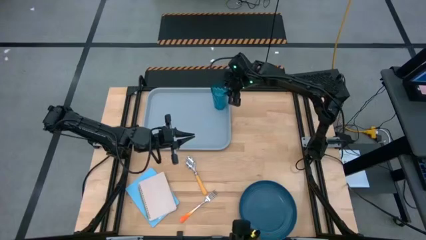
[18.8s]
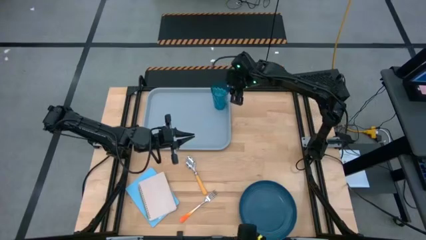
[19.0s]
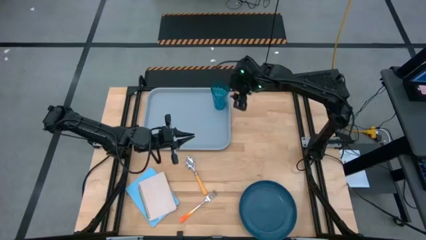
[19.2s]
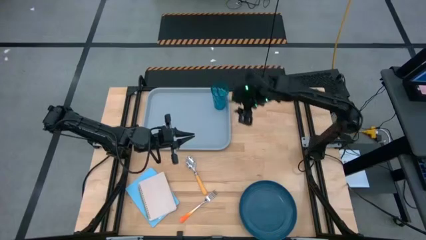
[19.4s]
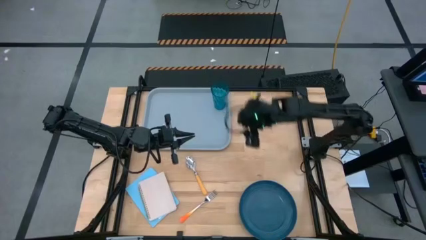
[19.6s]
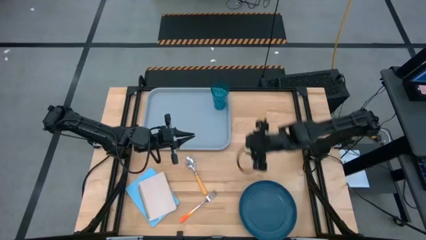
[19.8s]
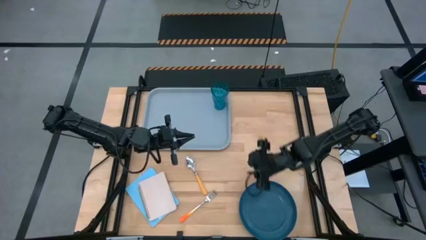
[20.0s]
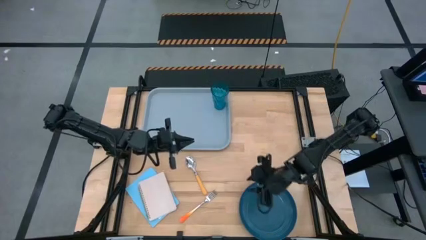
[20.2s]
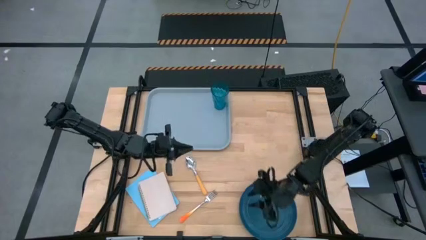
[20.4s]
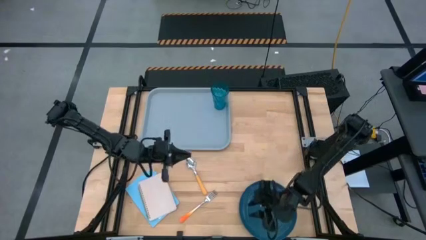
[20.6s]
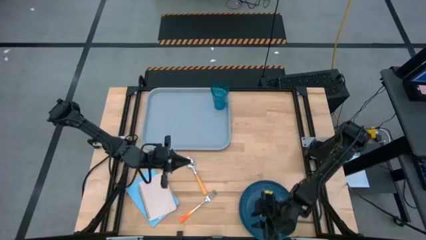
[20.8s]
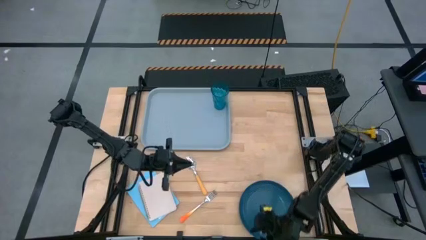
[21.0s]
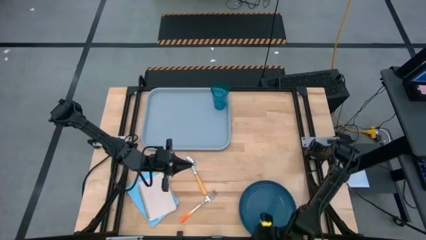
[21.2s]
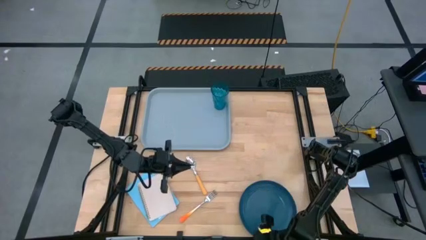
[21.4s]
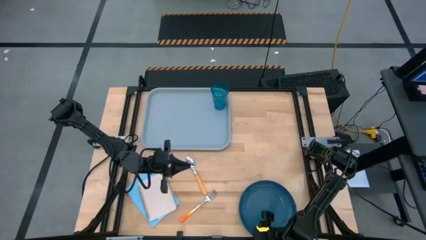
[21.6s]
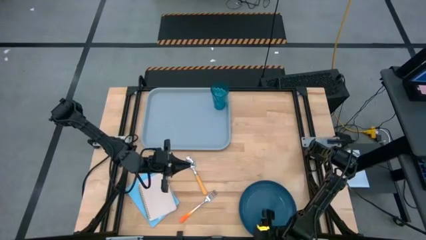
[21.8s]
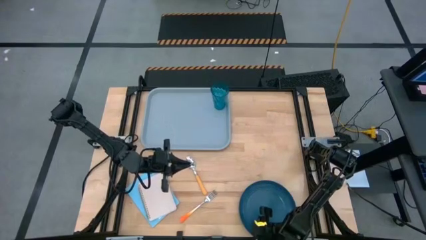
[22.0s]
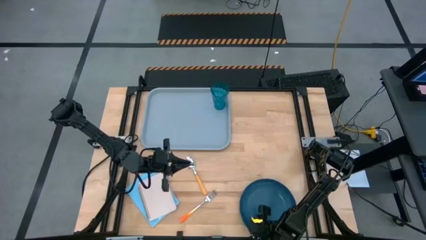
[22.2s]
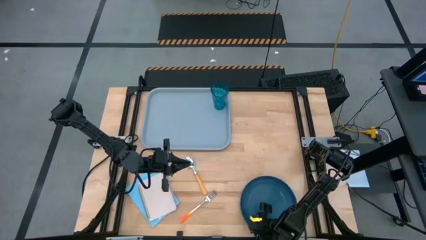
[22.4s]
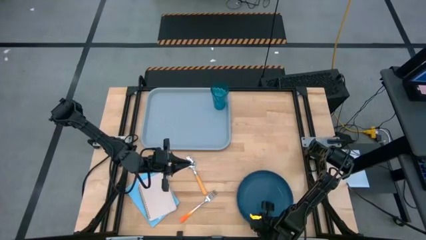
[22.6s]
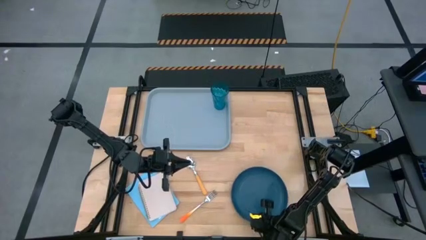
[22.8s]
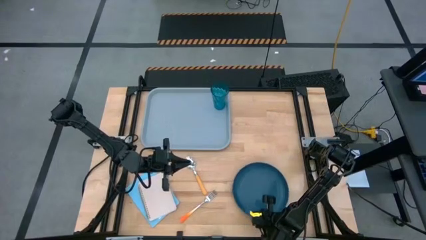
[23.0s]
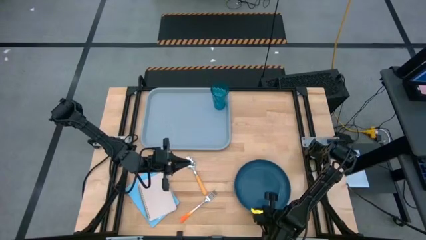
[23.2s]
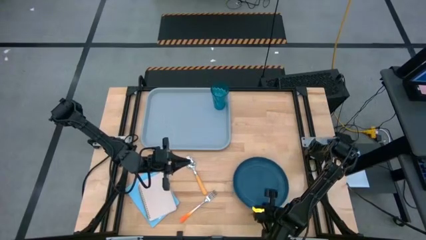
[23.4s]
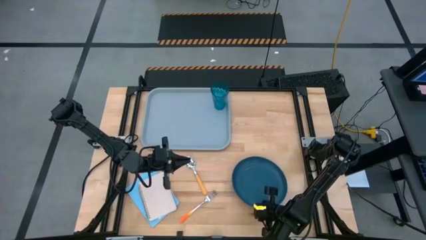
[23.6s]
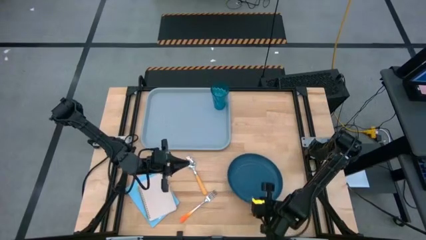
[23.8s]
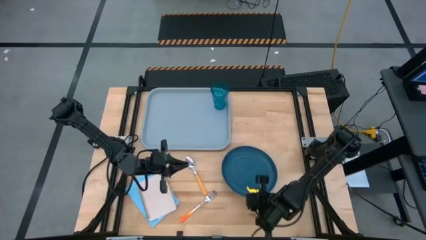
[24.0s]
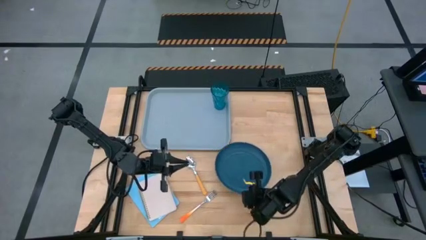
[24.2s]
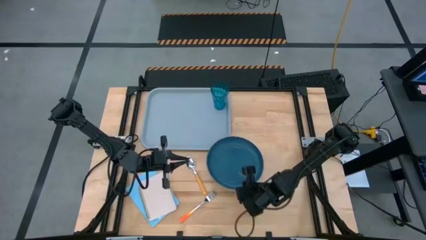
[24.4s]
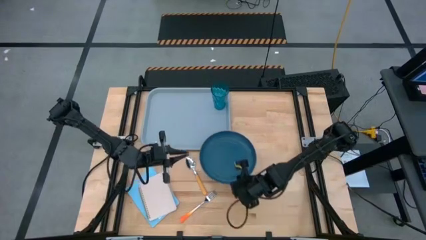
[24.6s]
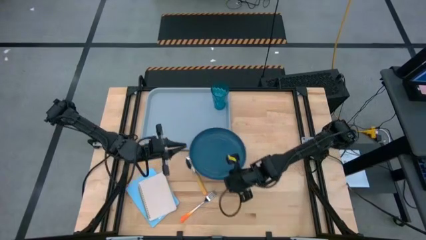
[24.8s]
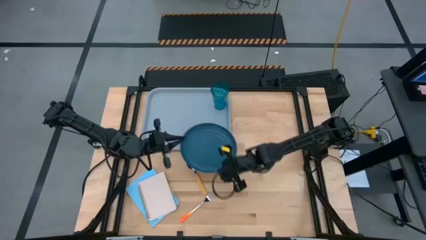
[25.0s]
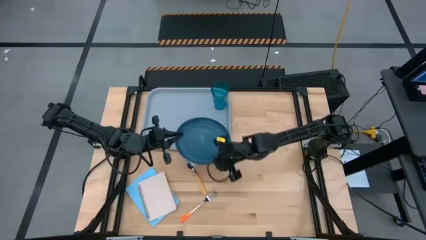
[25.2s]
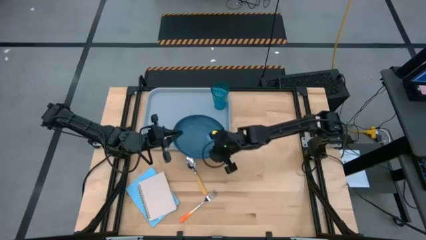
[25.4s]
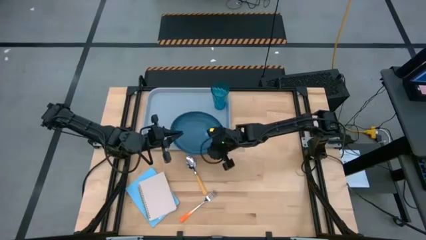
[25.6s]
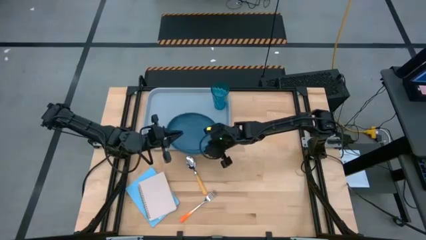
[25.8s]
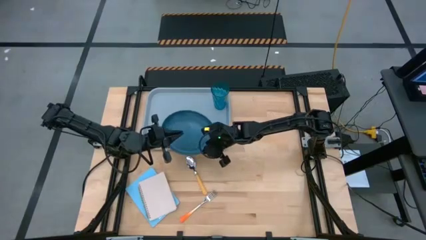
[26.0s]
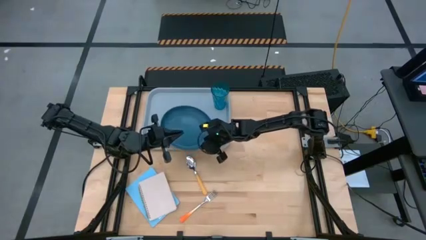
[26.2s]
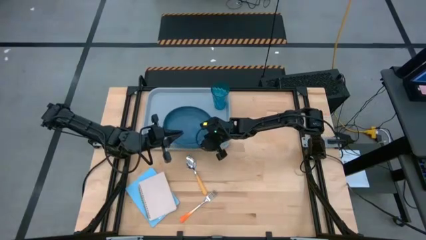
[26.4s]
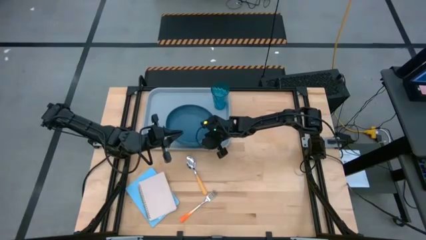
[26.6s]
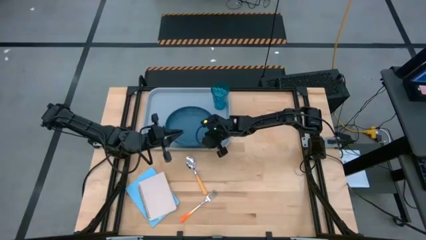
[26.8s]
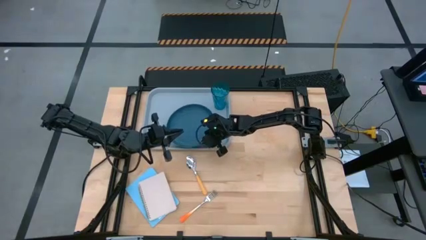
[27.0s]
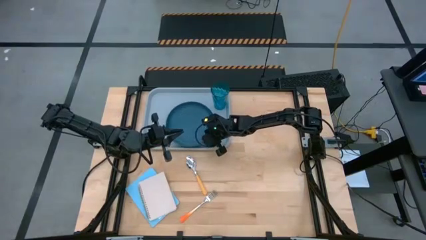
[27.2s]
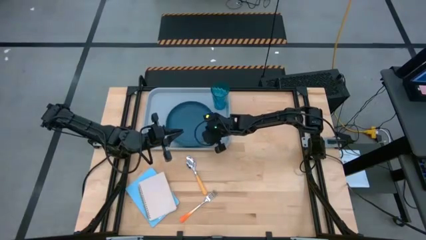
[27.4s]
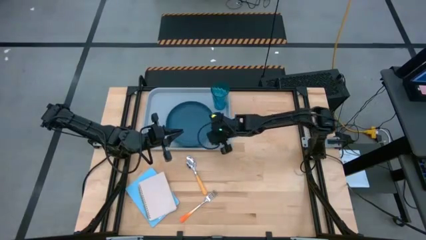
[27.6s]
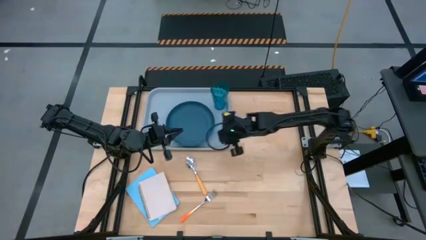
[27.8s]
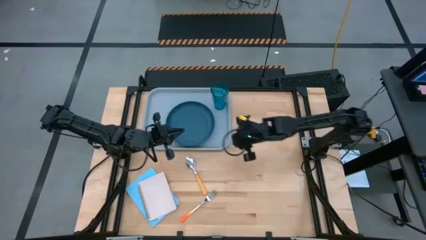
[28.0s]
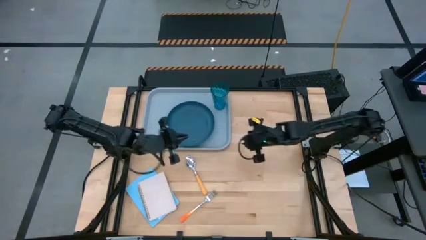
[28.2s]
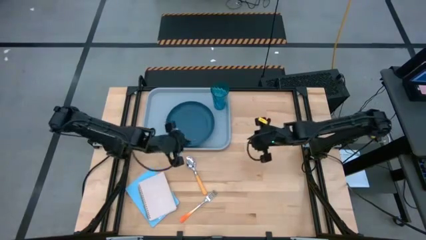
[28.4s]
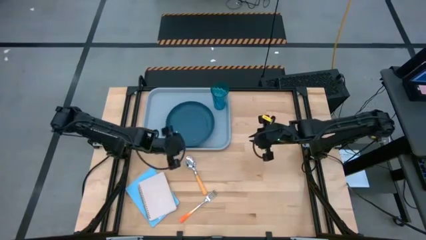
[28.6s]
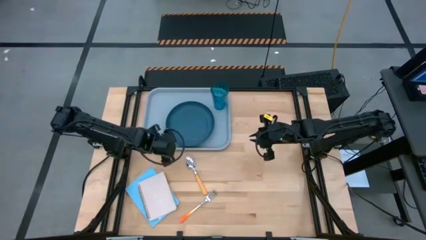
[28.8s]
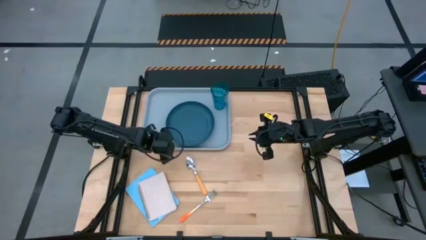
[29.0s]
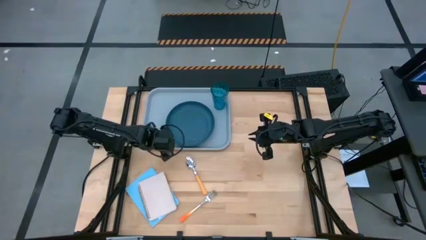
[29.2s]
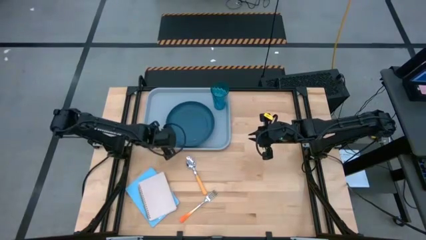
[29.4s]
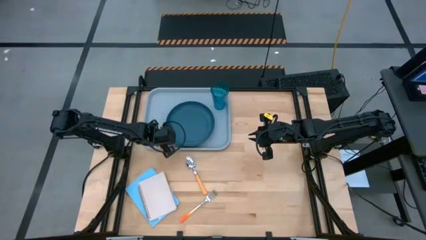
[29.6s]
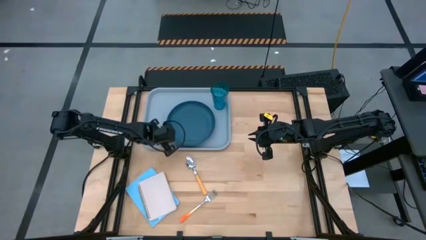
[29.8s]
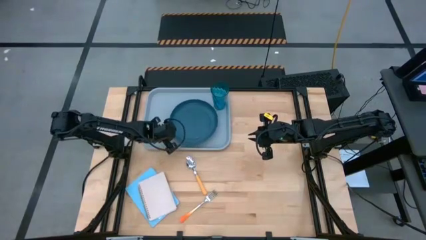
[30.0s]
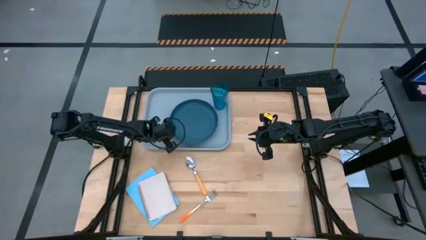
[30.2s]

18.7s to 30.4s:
Task: Pick and place plate/cup/fork/spoon on tray
Put the blue plate on the light blue tray to the bottom left of the blue cup

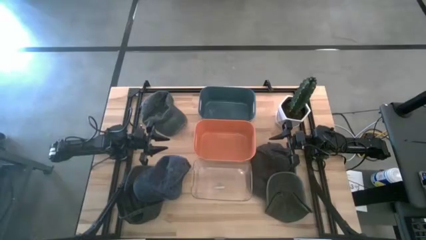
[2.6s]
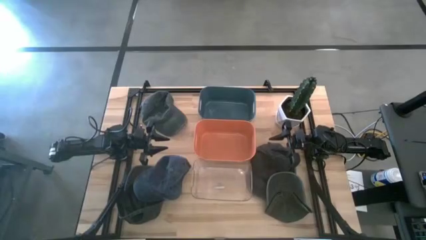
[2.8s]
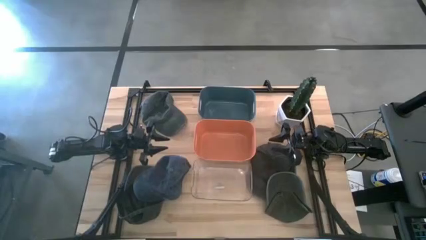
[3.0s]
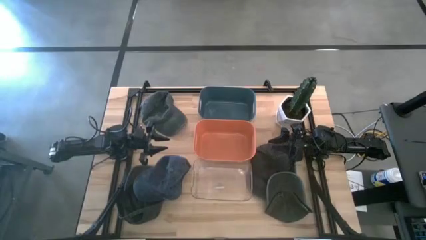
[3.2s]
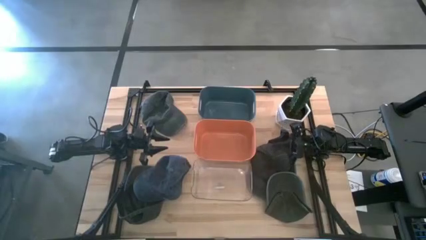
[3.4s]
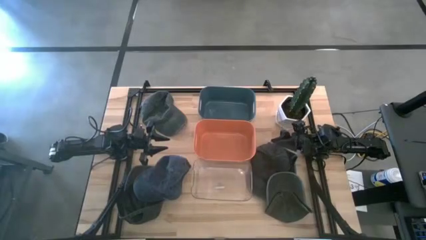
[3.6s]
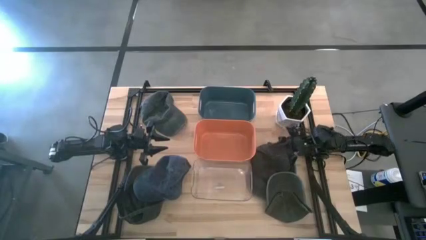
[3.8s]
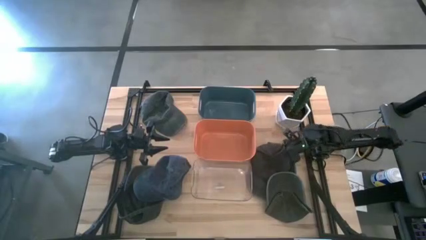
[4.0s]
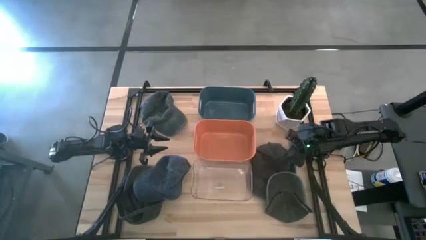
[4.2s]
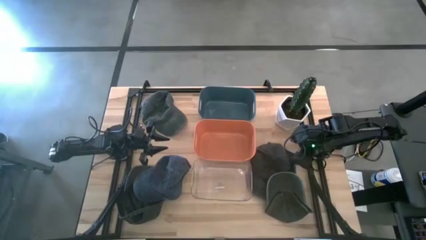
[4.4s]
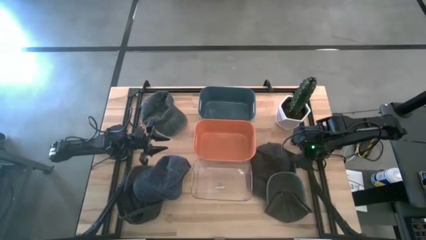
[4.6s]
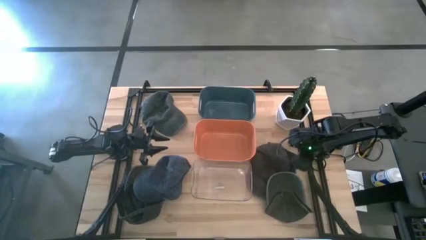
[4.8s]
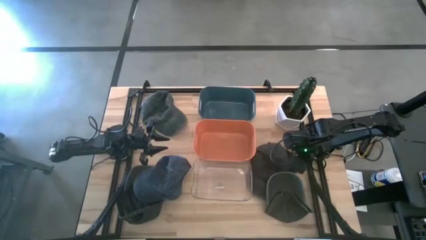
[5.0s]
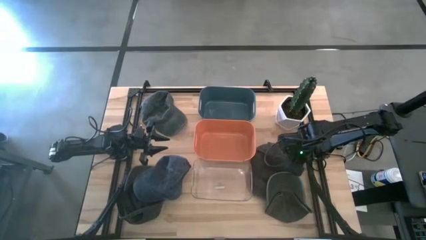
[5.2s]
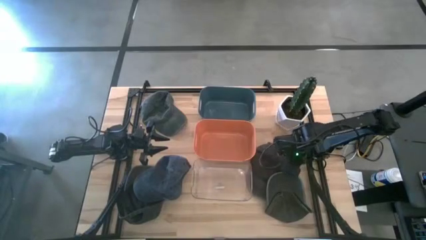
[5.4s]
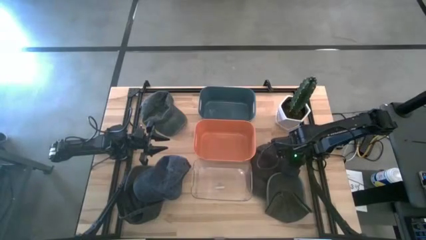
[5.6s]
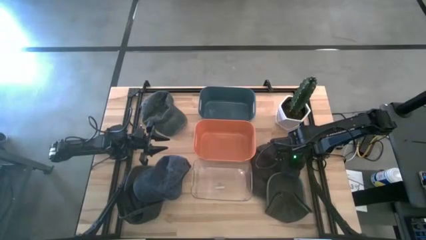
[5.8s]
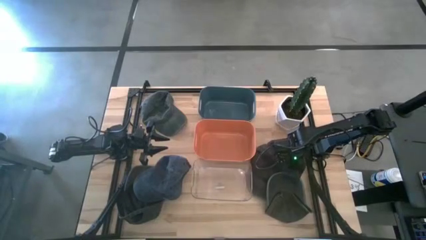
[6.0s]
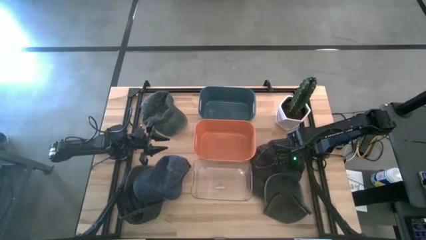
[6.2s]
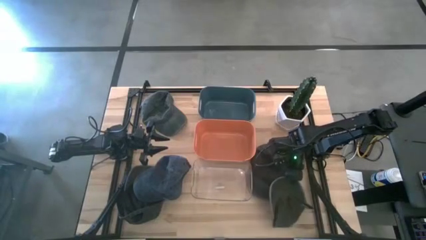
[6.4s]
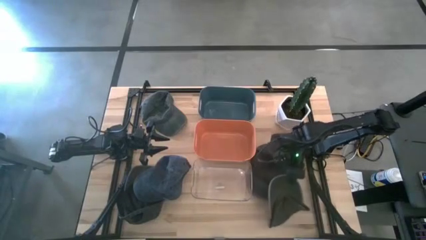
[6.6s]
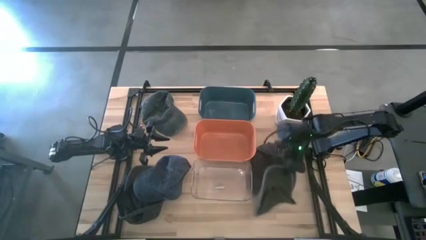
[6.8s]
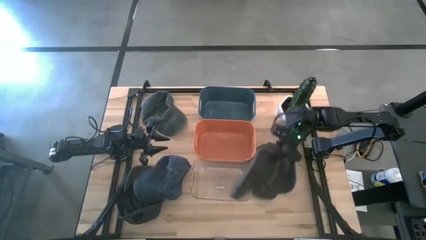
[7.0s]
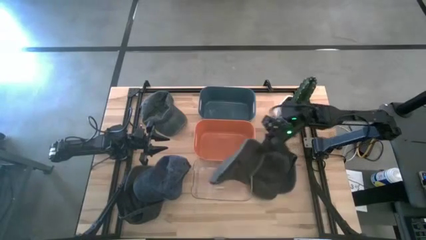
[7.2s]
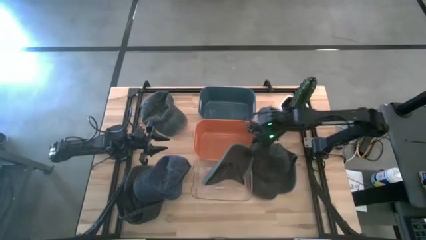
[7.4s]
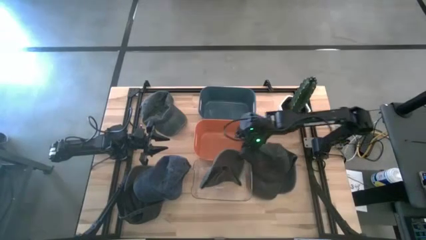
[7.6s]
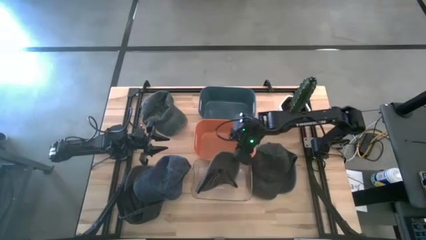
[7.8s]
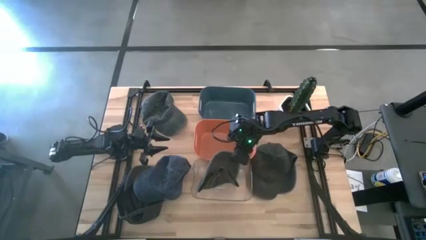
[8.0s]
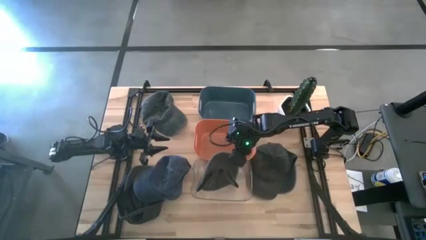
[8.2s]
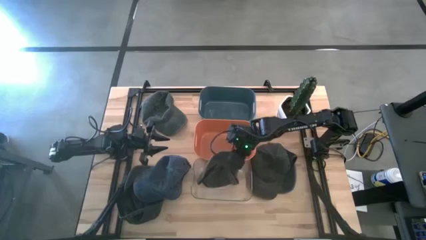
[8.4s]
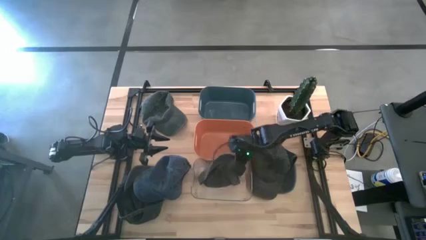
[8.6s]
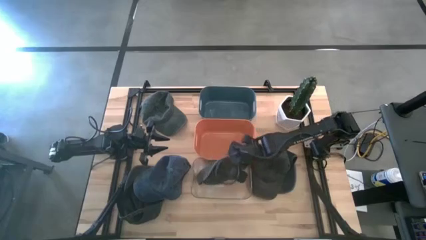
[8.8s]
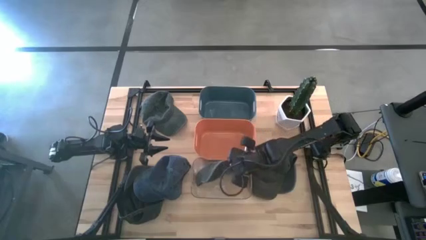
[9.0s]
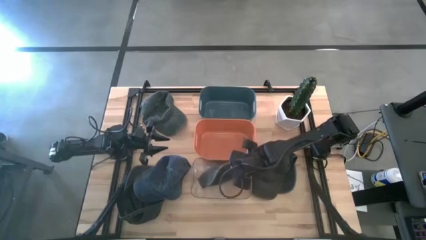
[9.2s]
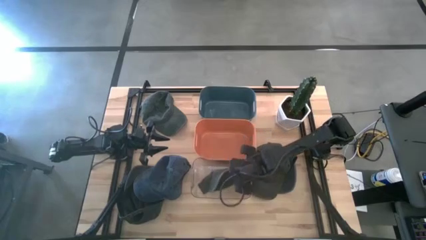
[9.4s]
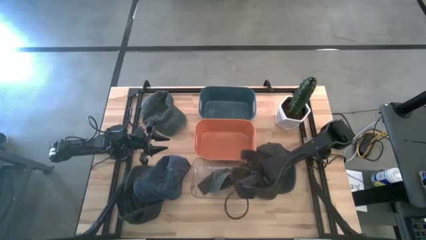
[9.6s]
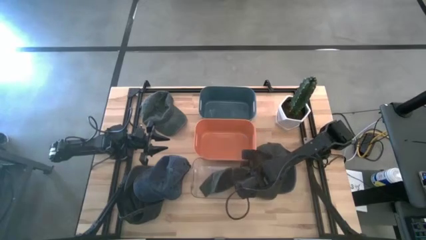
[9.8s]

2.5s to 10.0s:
Task: Pick & Place hat
Put the bottom gray cap into the transparent bin
